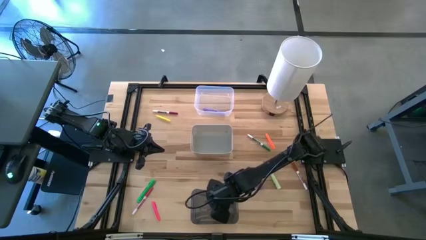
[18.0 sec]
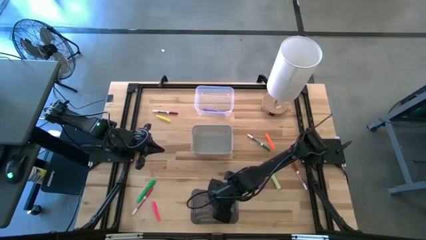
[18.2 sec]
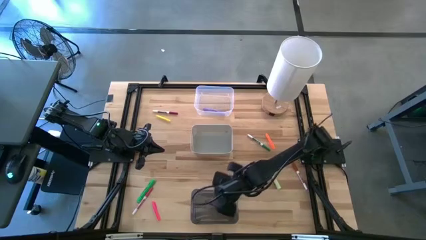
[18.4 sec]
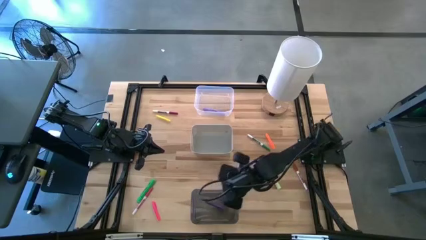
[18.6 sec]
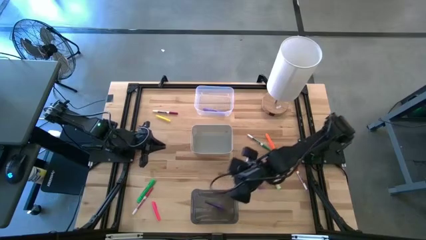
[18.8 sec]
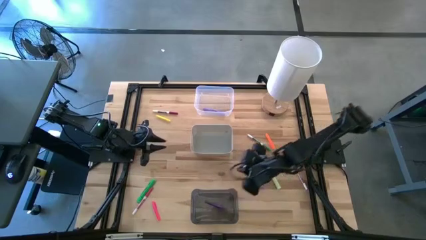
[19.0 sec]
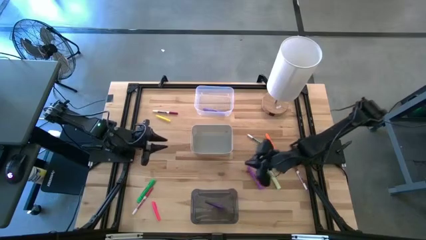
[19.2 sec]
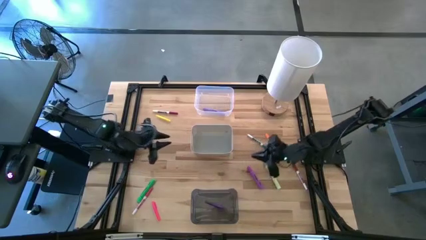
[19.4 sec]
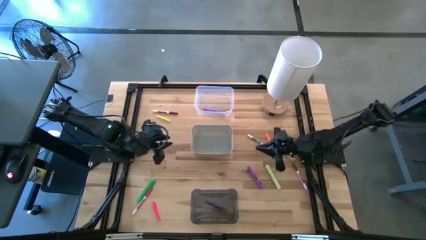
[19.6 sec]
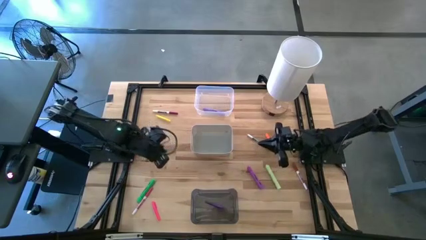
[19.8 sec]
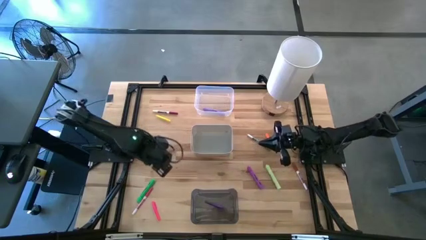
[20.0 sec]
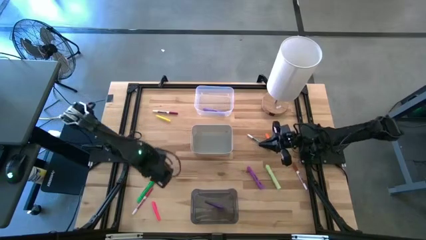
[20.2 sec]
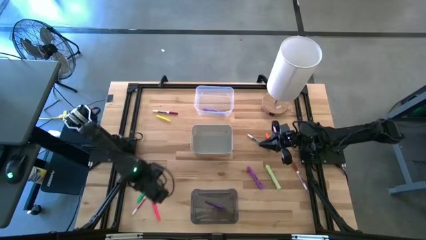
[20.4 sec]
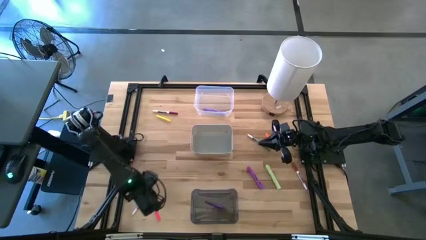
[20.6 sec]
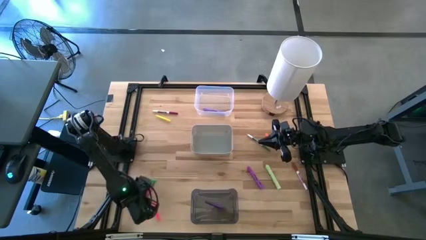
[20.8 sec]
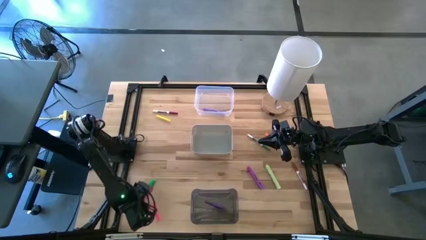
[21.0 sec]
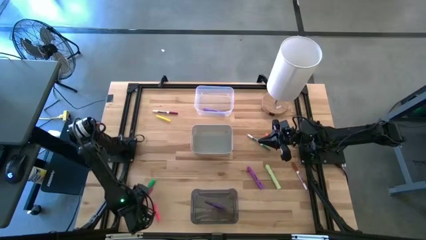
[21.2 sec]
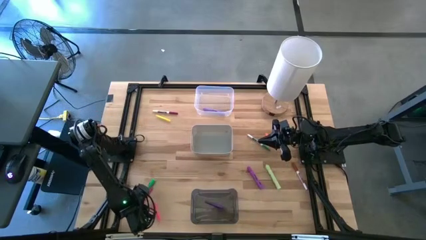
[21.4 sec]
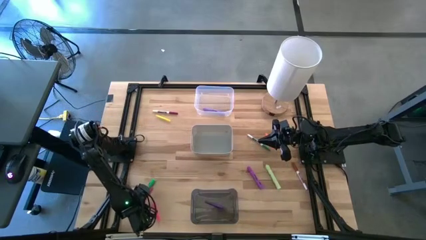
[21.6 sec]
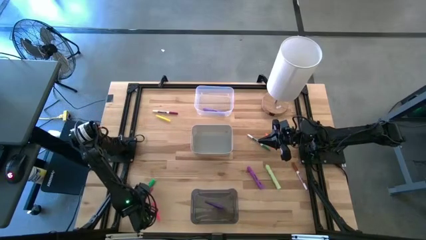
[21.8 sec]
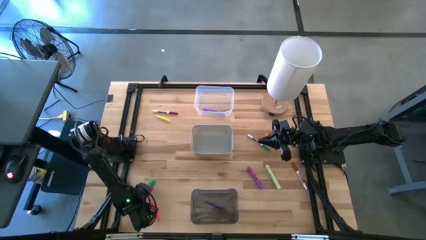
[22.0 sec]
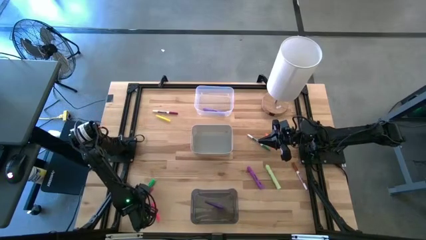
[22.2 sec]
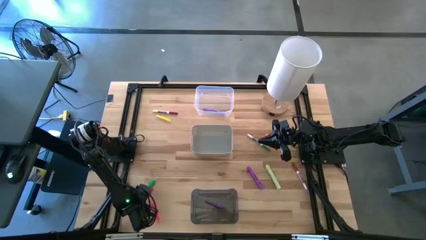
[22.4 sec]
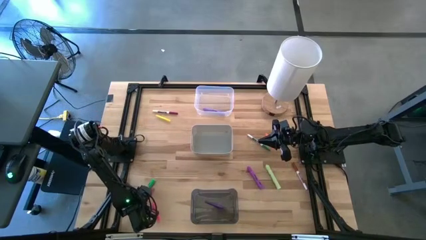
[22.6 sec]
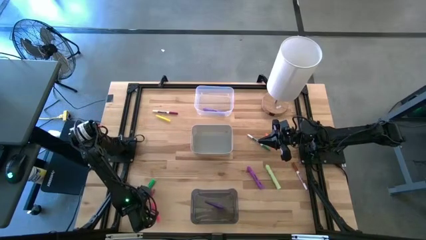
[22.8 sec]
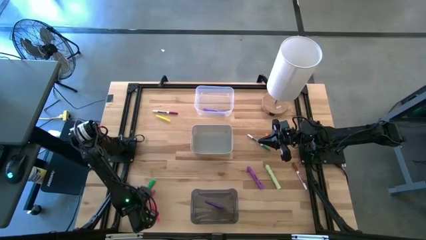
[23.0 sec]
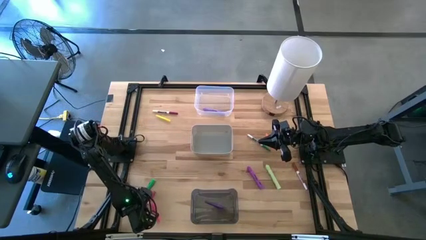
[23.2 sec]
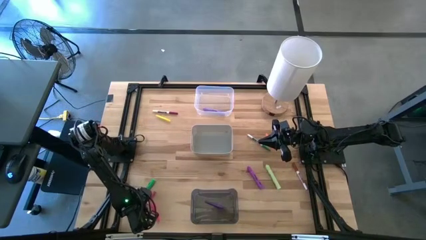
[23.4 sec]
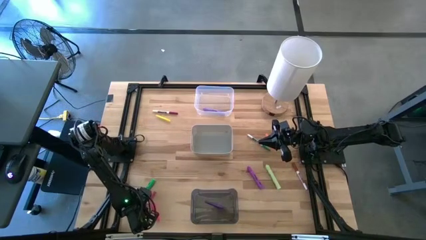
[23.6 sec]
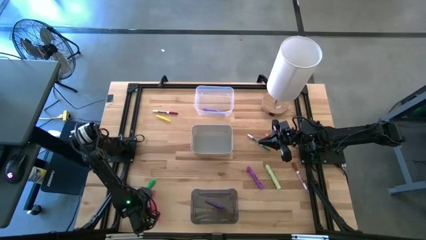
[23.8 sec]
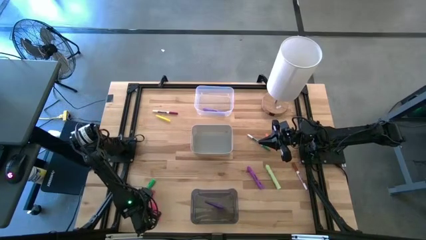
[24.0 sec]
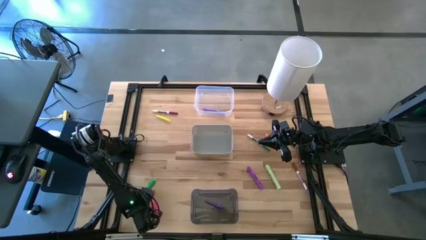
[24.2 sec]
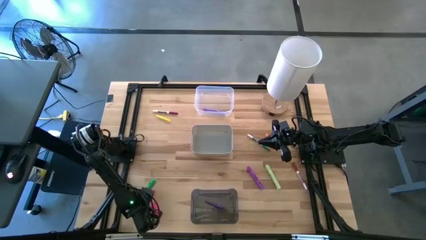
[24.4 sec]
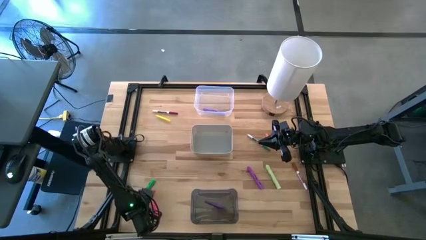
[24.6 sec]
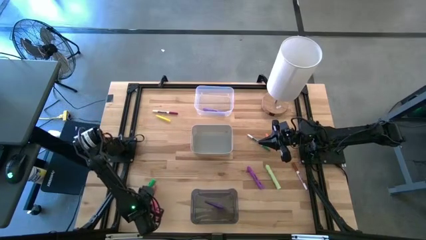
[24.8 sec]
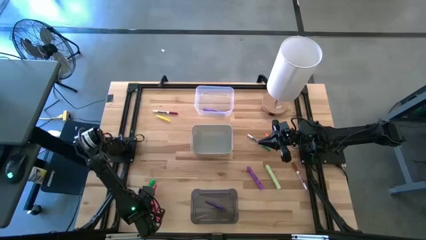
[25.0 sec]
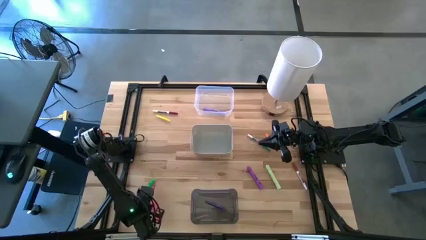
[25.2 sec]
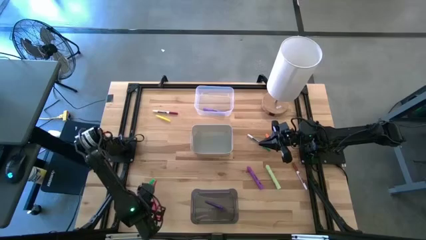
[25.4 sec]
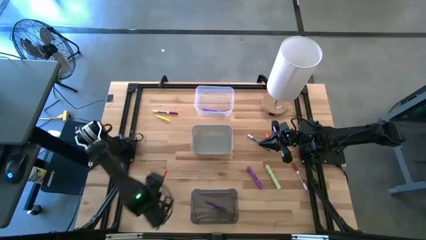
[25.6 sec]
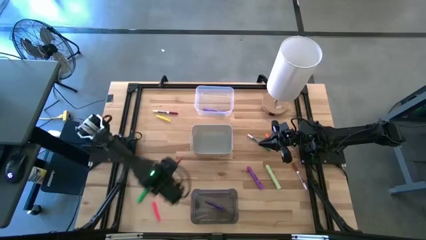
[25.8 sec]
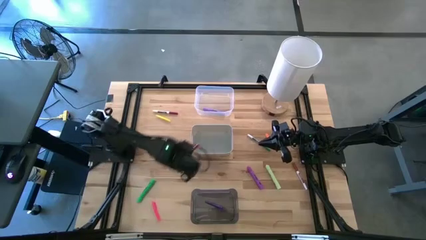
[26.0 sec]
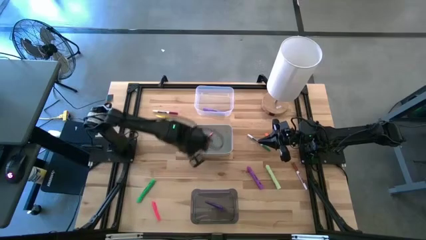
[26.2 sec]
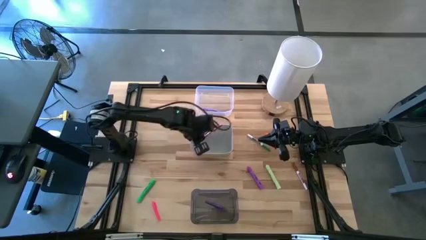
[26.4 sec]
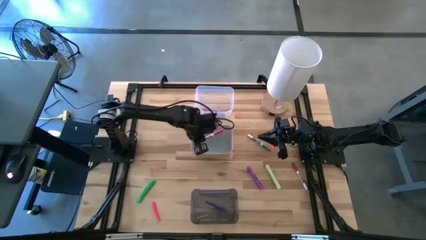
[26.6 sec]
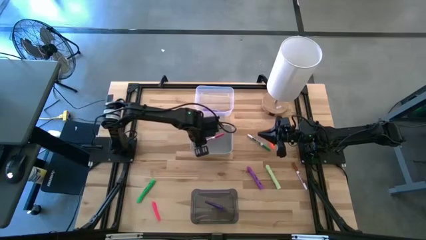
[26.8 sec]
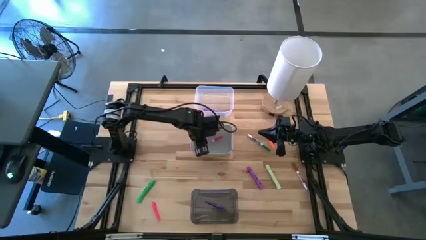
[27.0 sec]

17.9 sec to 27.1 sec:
Task: Pick & Place Markers
Put the pink marker into the gray bin

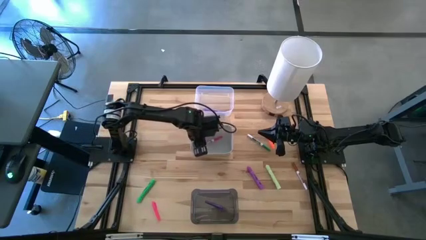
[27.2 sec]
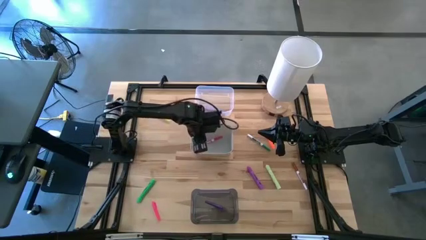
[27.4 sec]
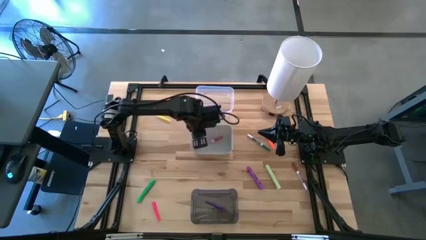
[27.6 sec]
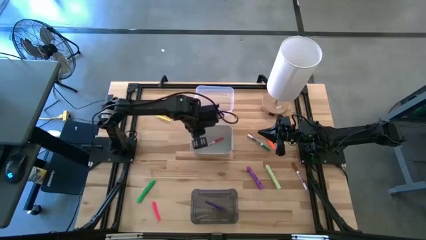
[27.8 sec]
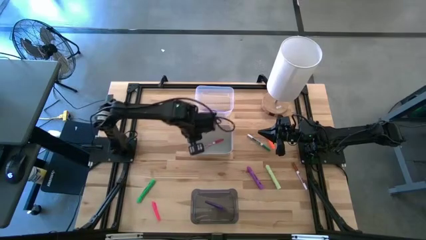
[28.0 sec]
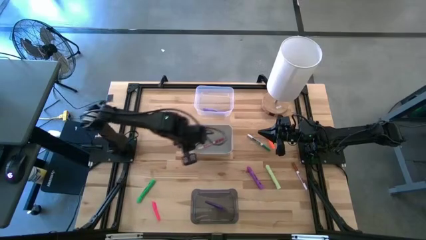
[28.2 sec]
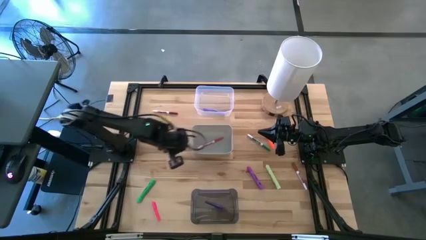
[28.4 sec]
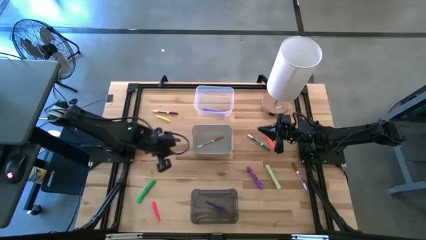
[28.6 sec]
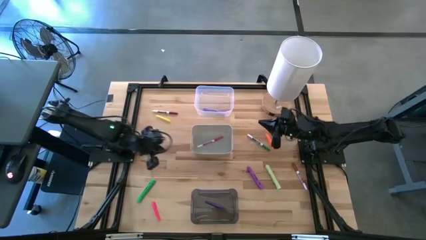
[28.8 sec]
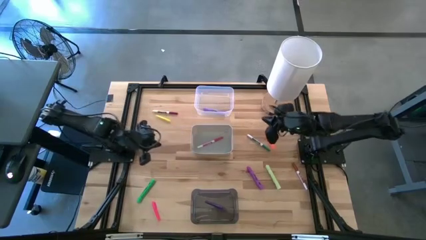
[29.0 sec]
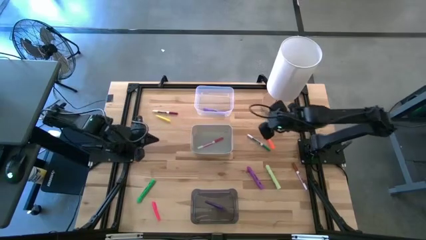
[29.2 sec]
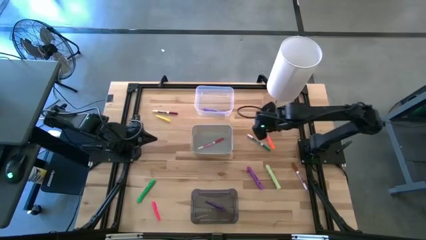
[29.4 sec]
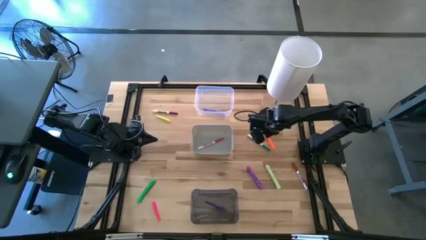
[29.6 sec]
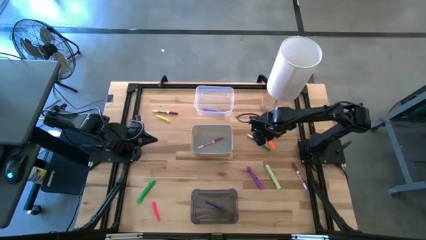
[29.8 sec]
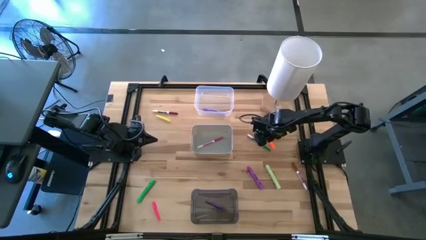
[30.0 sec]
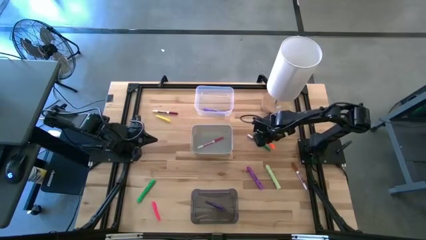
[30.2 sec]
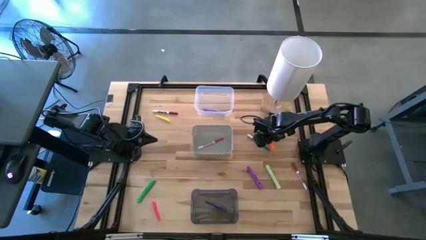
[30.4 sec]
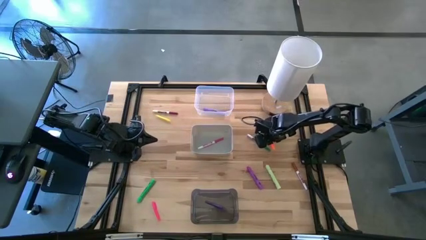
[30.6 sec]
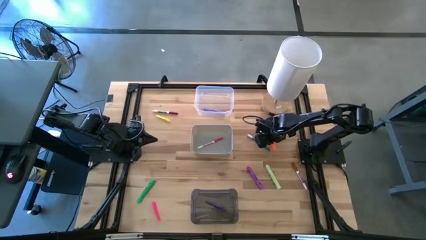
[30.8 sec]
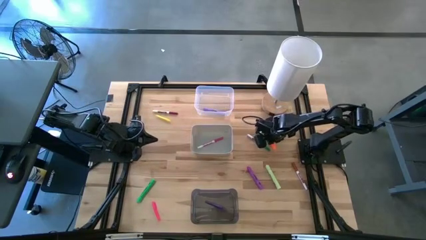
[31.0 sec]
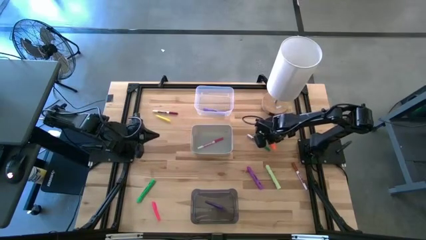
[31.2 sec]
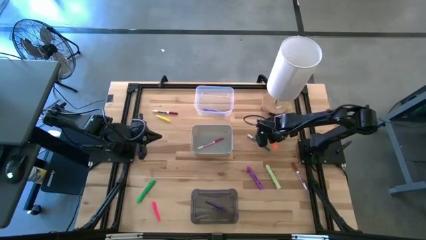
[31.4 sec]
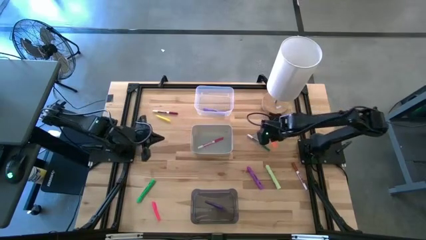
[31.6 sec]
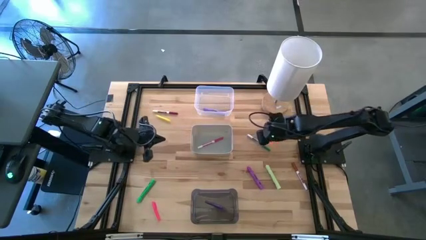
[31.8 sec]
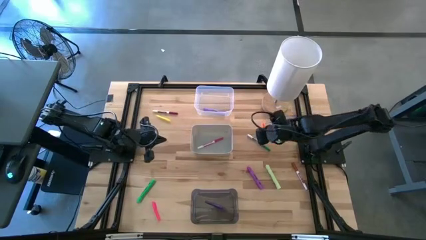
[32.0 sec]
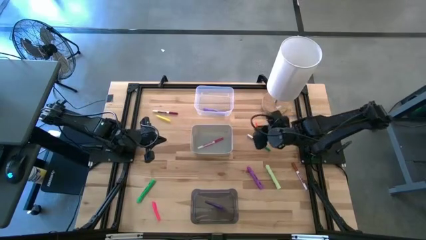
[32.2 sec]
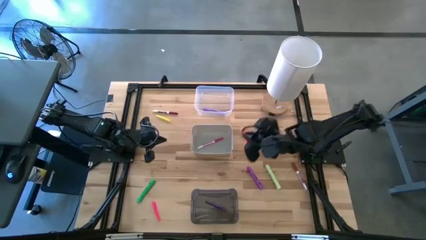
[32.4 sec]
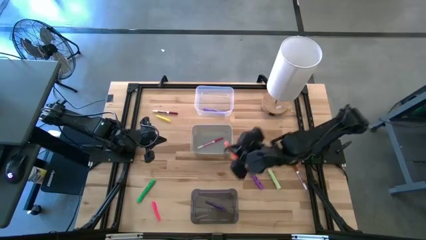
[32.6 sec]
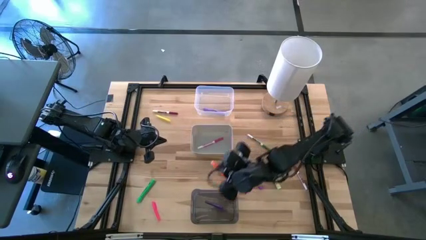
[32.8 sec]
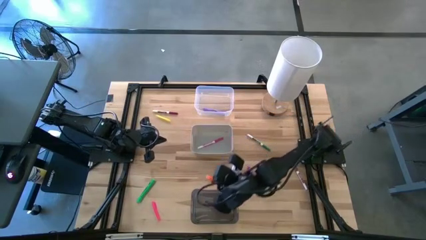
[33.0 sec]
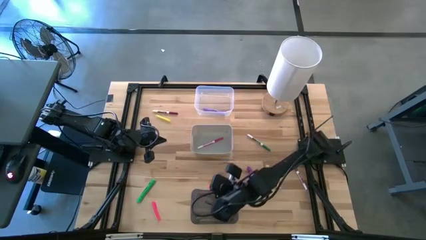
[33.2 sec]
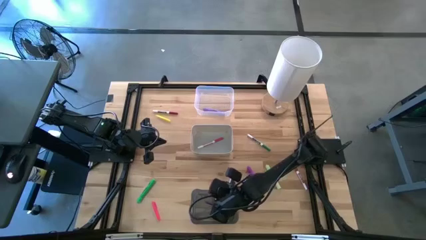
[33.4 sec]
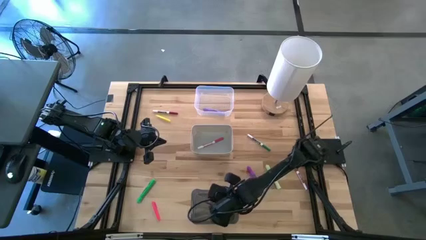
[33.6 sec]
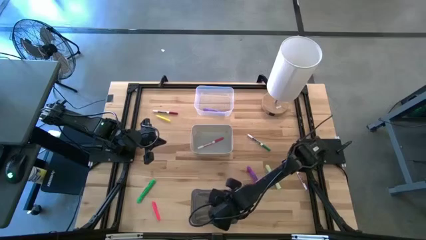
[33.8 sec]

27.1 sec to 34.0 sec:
Put the orange pen into the black bin

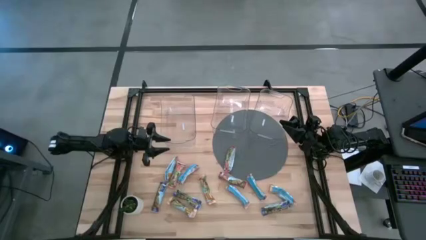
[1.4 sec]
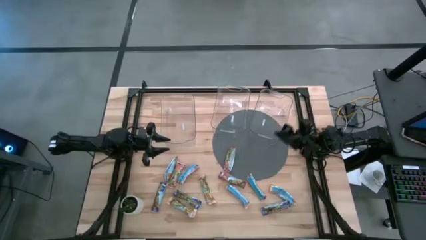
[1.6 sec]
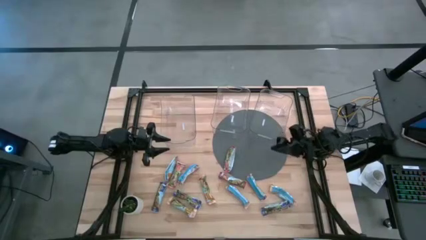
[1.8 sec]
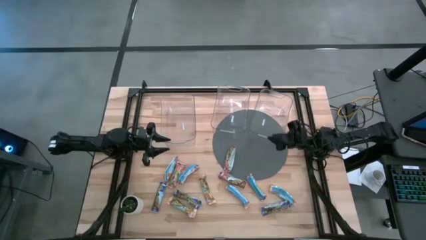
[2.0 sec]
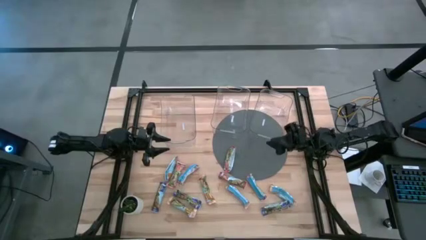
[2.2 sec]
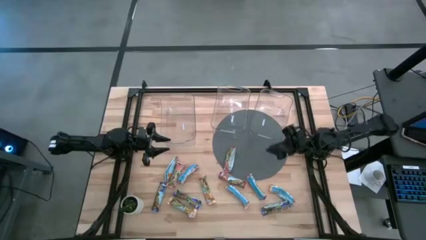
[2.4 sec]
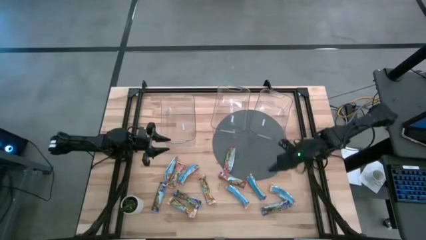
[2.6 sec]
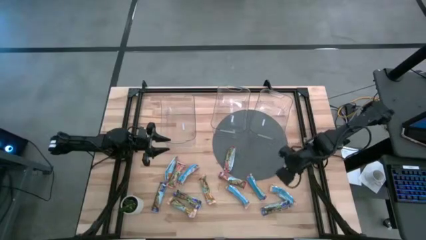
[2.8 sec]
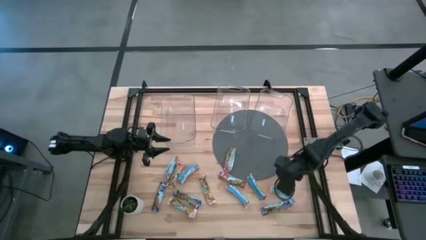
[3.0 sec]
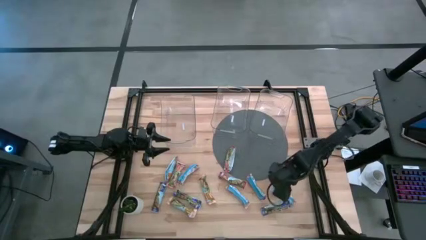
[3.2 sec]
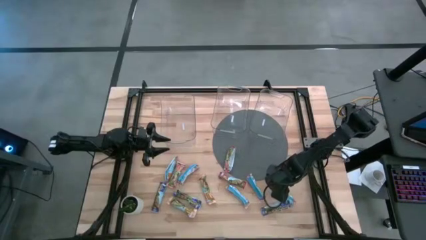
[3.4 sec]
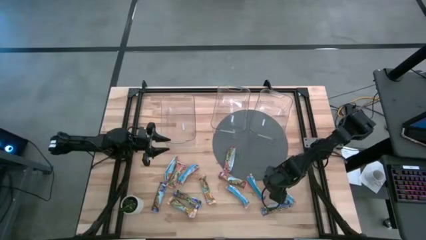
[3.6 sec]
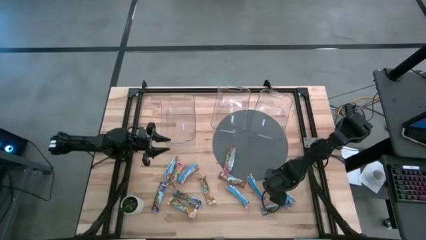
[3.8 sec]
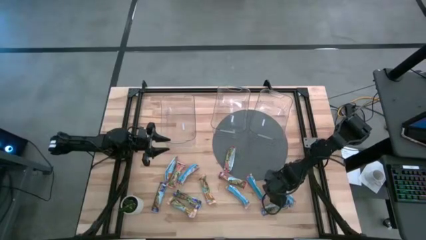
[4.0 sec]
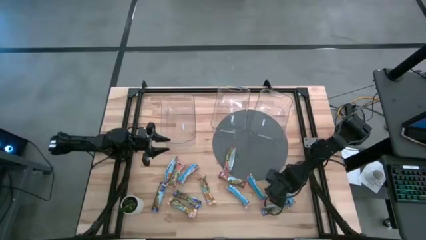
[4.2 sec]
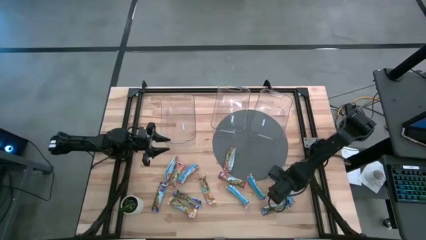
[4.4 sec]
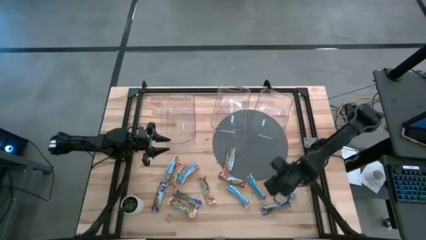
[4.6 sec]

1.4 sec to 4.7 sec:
Task: Pick and place Granola Bars by type
Put the yellow granola bar into the right transparent bin
